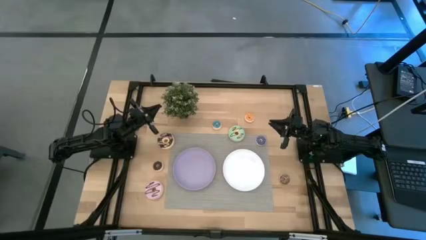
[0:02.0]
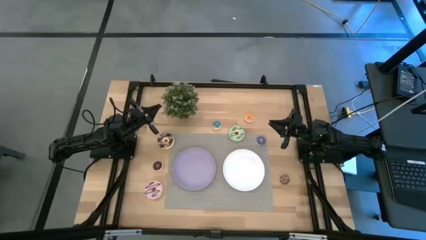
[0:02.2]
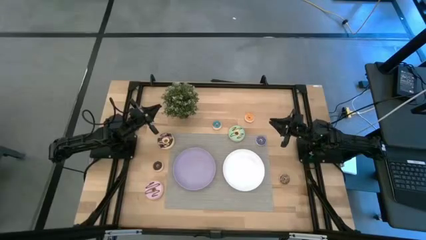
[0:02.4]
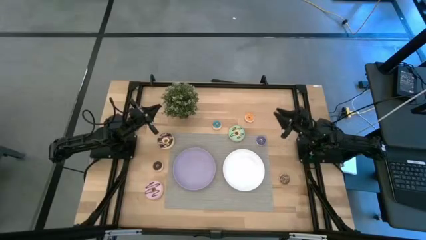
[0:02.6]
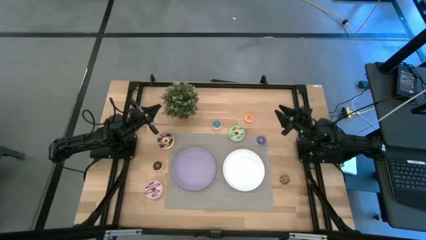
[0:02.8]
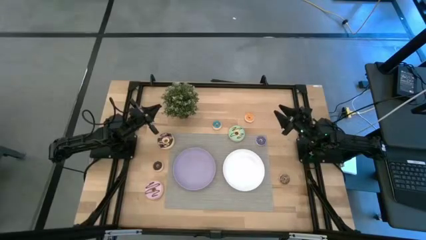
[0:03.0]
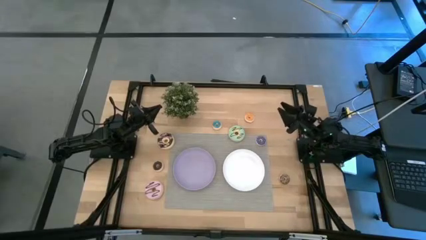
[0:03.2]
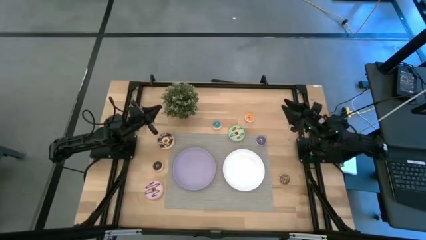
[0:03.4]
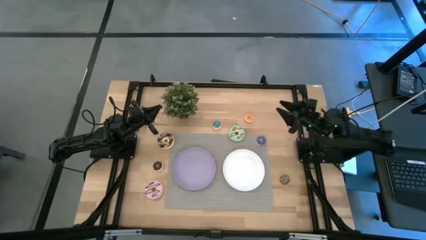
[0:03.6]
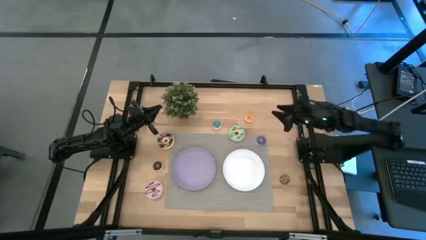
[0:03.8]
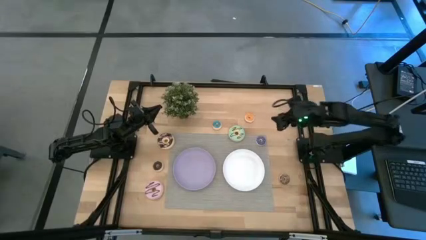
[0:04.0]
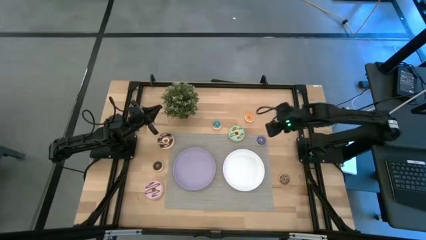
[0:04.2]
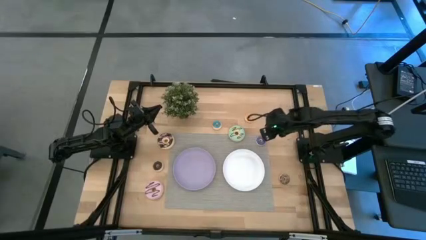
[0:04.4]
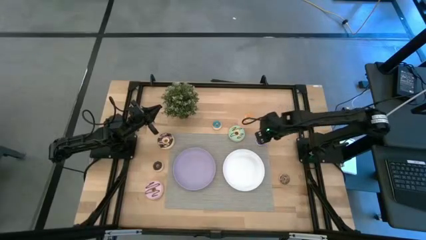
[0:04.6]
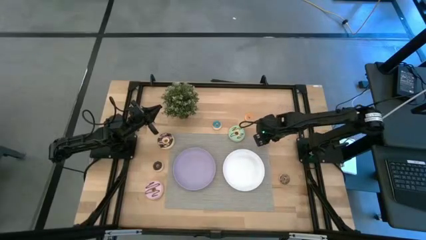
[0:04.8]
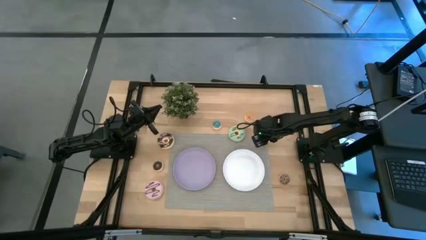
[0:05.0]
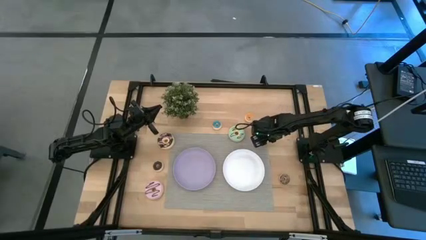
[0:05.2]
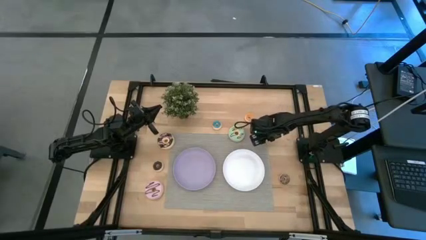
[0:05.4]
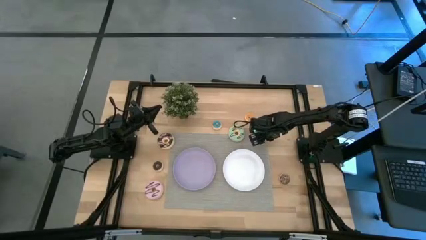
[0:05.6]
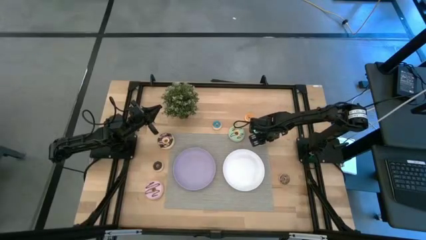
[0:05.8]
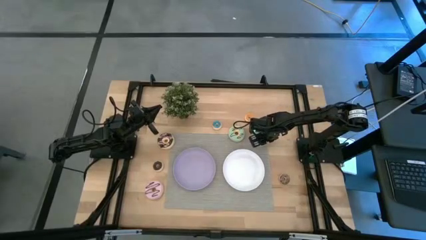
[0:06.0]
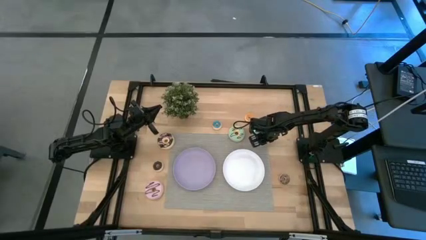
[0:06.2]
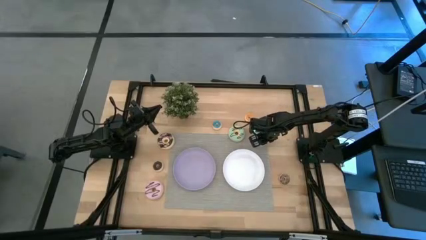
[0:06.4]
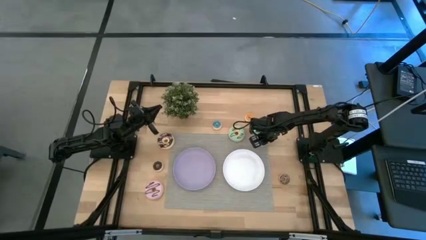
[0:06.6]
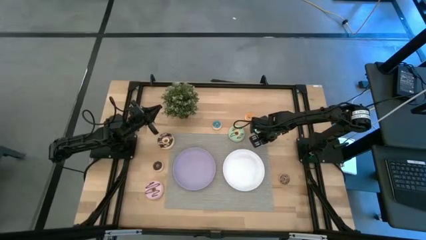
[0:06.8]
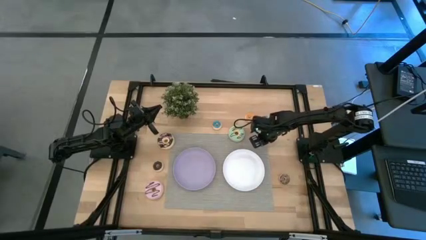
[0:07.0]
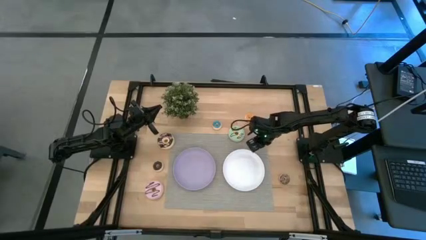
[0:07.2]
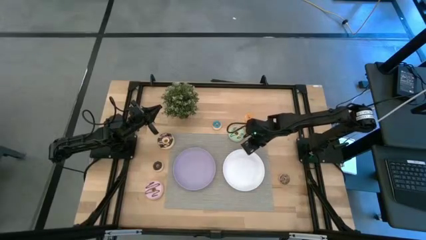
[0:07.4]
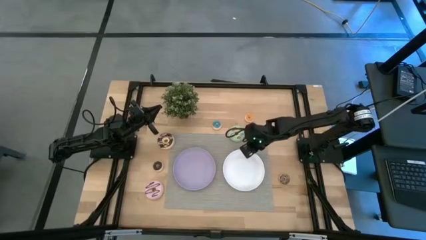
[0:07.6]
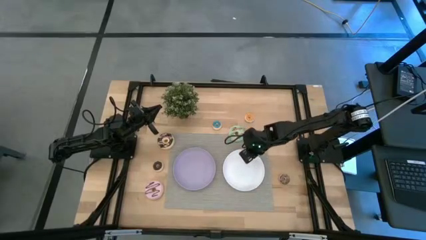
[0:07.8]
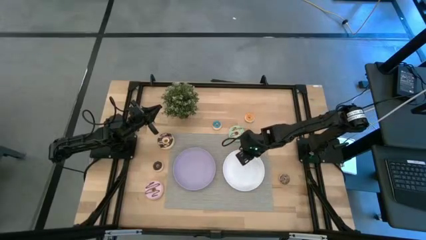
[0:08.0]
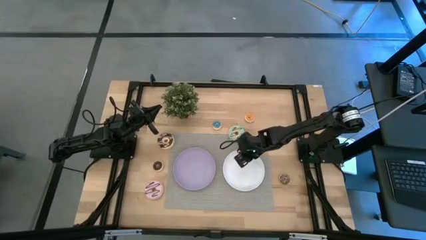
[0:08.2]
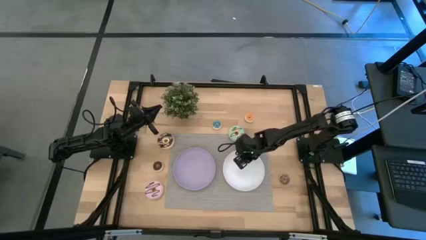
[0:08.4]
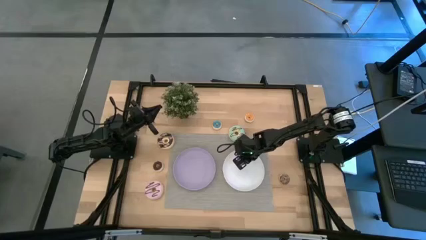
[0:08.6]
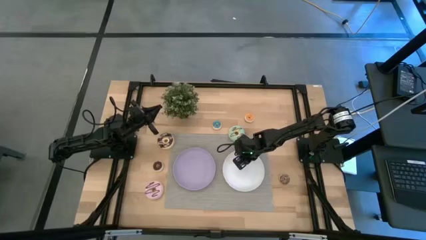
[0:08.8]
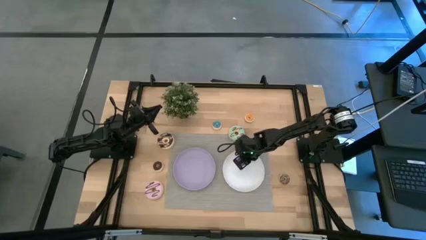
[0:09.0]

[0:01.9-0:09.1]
Task: Pick & Place donuts
Put the small dark blue donut on the white plate

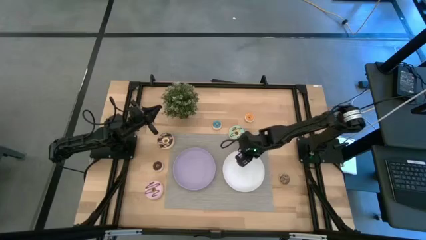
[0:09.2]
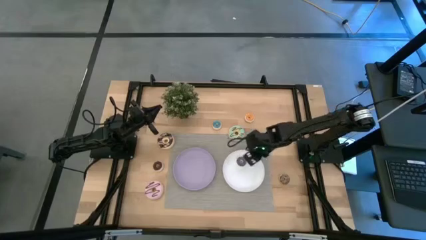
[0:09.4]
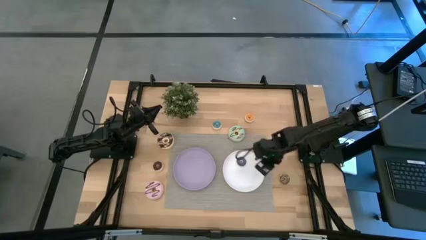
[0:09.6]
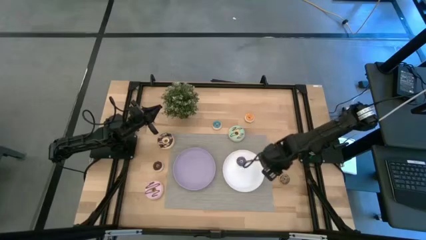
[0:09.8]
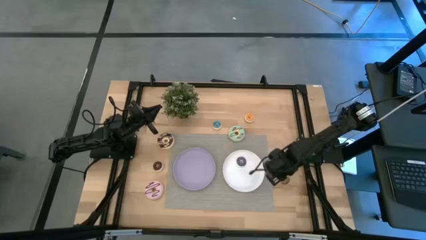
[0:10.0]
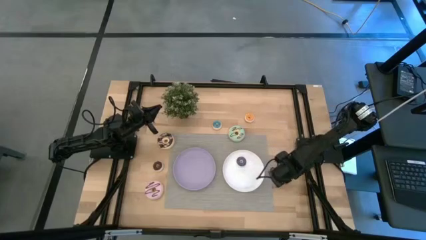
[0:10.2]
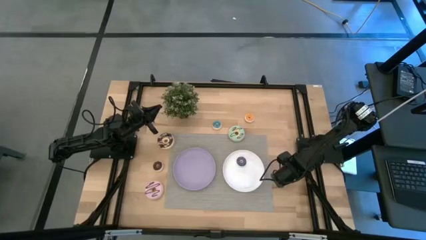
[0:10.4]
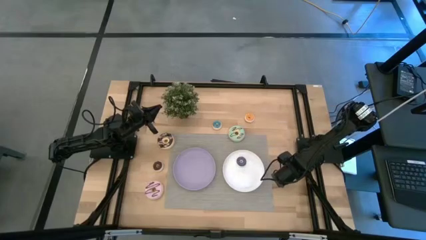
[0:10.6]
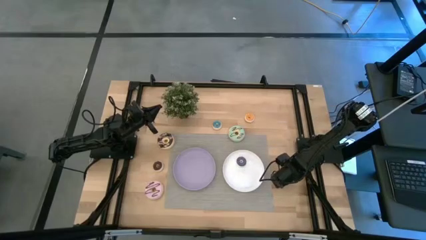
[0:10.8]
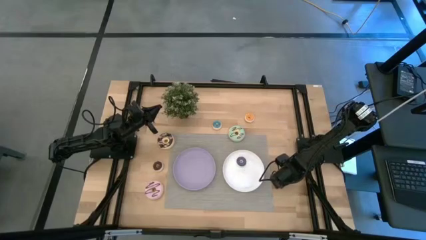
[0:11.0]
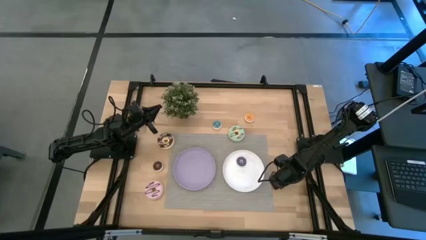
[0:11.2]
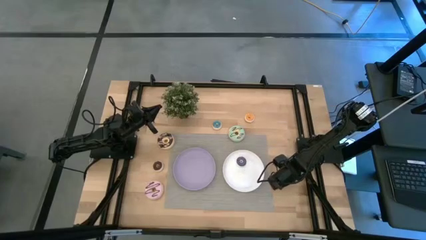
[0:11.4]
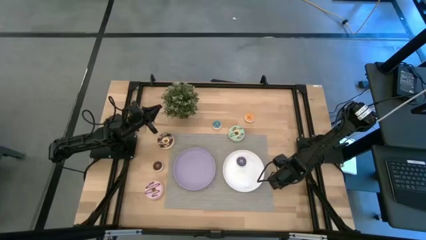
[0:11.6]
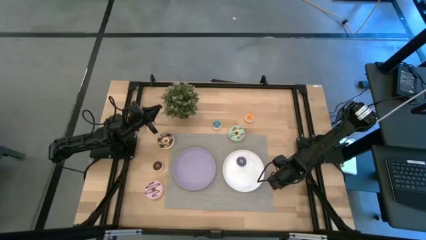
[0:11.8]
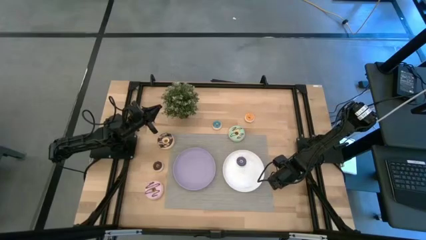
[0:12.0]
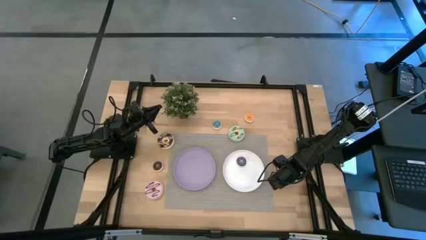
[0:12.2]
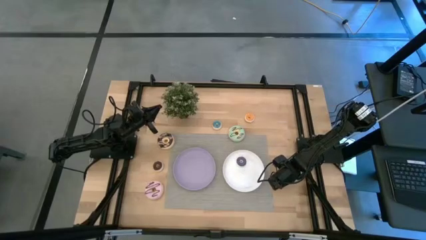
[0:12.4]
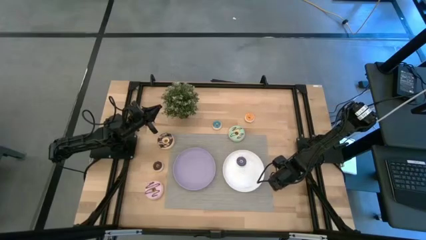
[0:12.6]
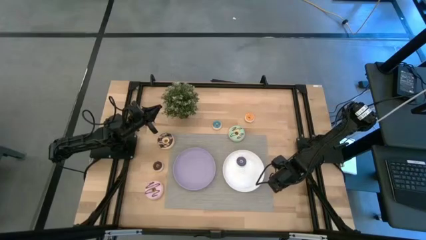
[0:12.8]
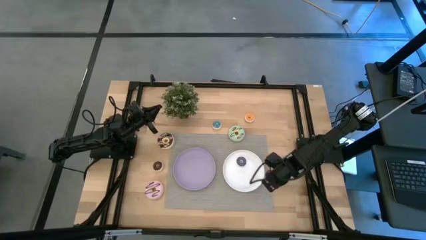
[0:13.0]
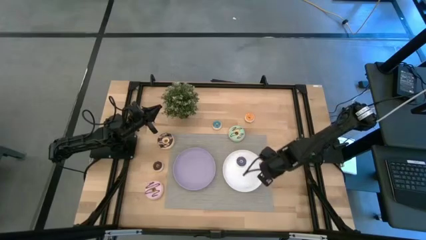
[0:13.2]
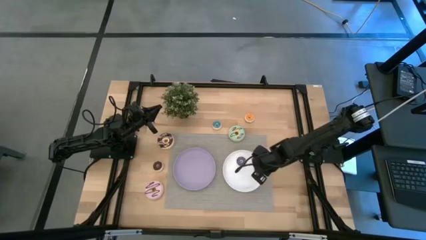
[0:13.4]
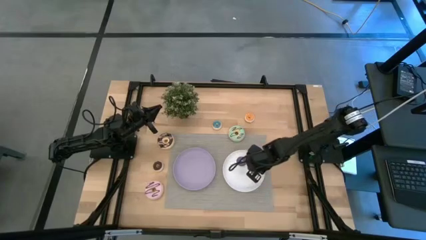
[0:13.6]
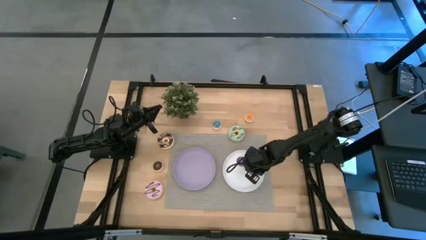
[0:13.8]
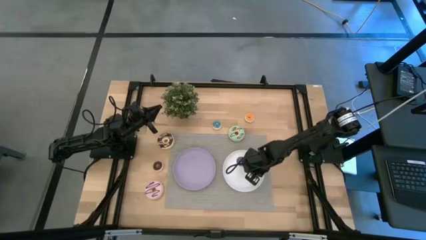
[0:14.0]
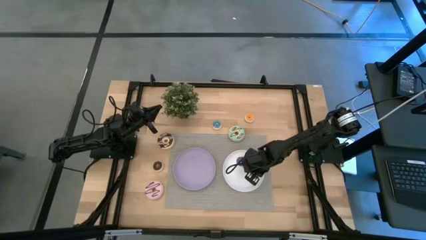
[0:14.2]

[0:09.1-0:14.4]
Put the small brown donut on the white plate

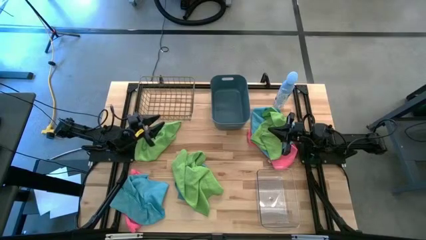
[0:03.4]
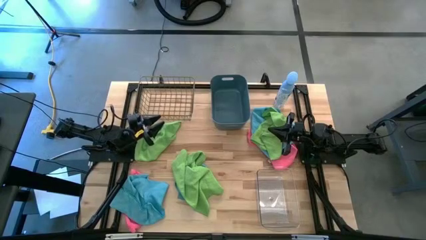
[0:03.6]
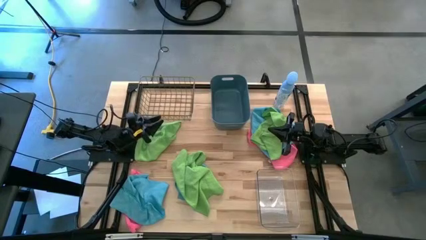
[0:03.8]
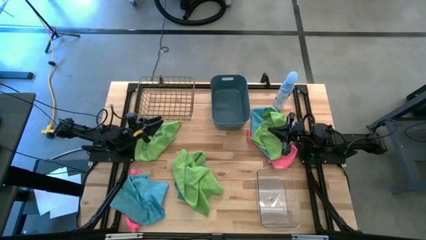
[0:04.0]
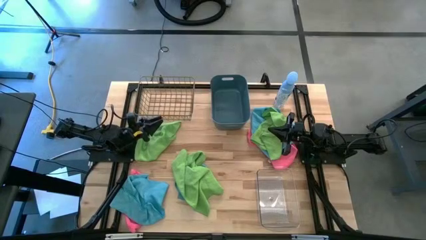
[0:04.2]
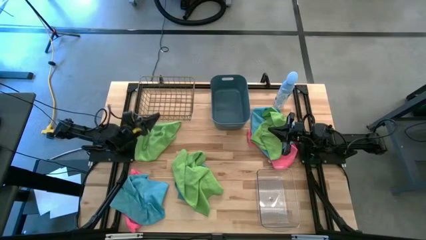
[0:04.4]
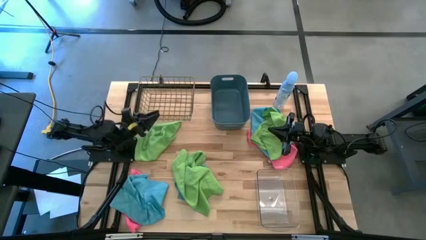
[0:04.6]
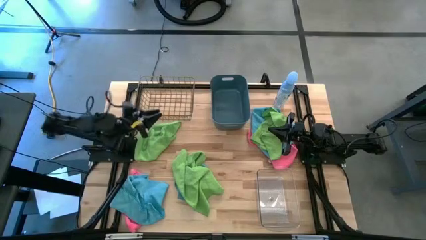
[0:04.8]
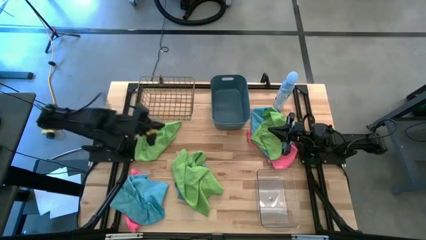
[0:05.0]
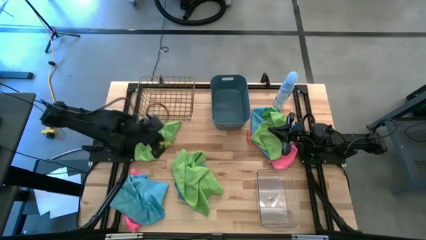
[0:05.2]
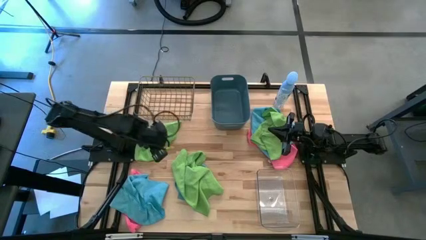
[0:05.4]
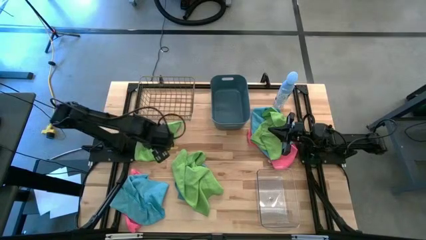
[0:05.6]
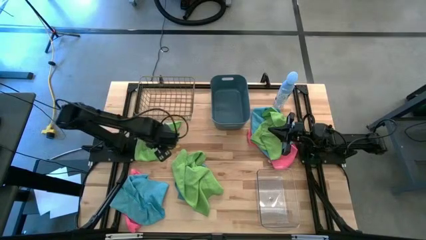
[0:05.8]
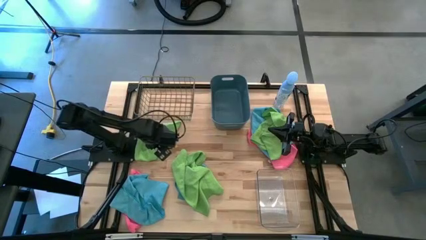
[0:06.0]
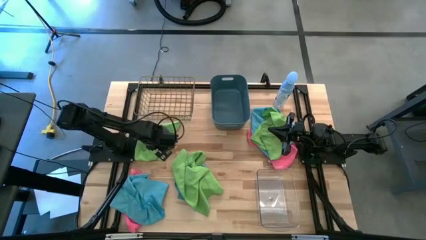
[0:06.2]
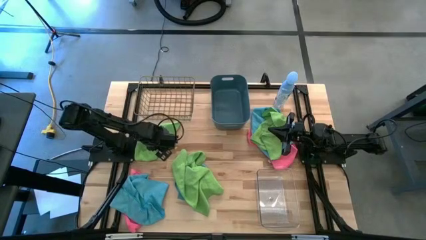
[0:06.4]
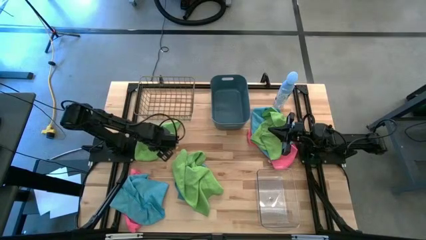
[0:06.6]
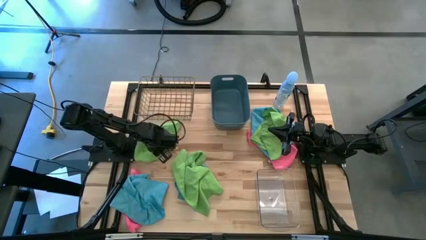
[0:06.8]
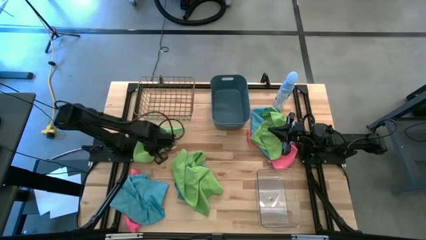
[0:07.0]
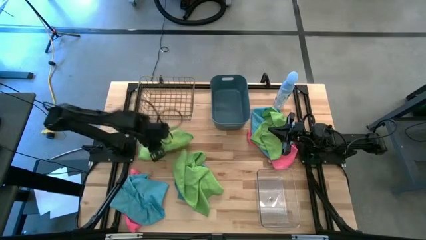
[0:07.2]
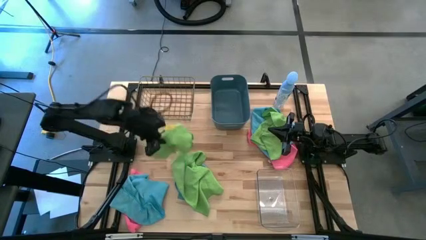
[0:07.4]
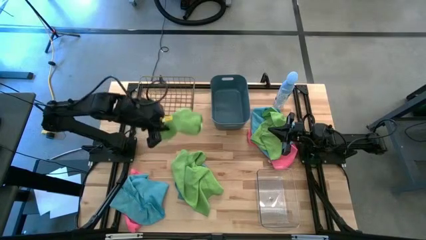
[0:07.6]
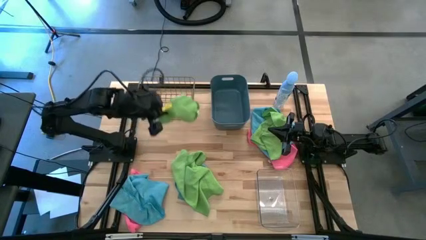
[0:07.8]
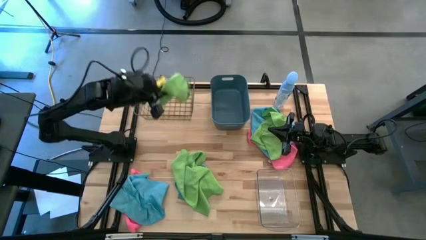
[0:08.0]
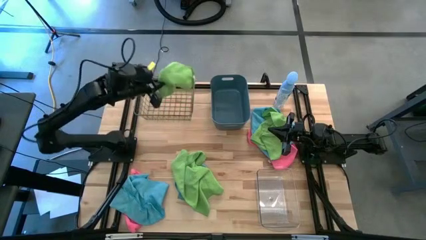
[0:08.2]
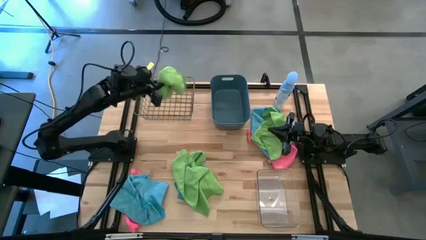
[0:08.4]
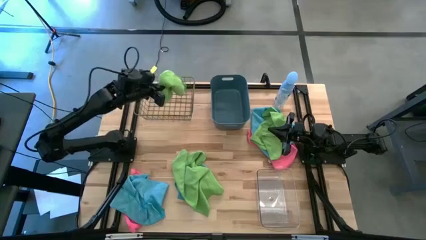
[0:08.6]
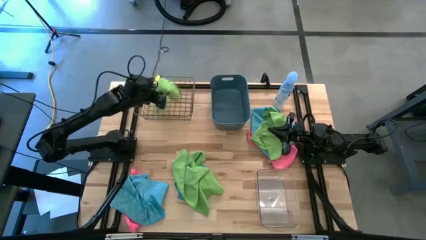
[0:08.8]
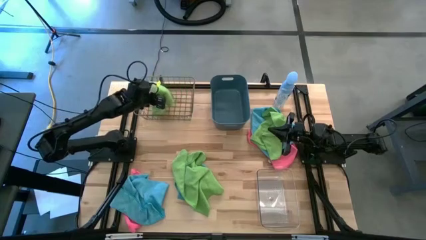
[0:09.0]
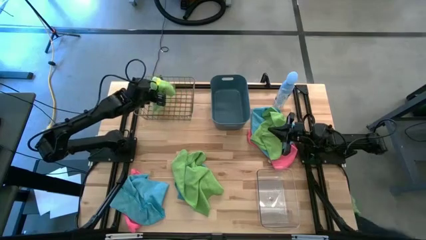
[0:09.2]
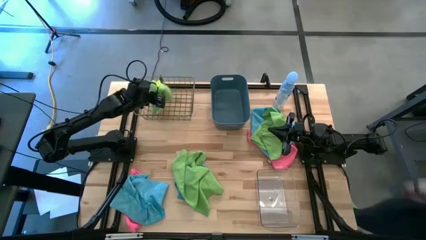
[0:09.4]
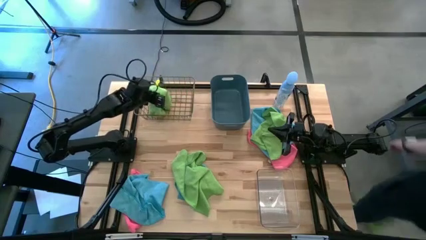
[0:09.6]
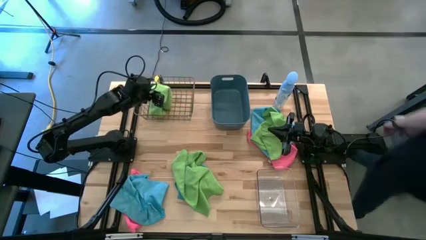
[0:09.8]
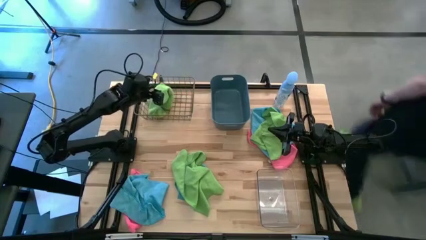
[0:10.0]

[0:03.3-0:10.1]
Task: Sort microfiber towel by color & place in baskets
Put the top left green microfiber cloth into the wire bin
